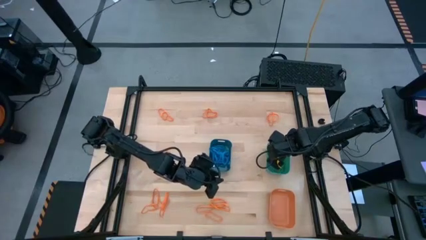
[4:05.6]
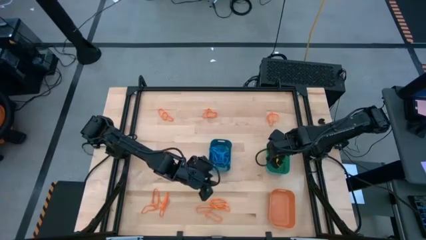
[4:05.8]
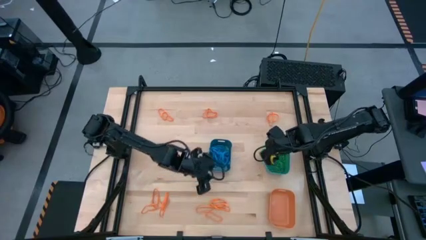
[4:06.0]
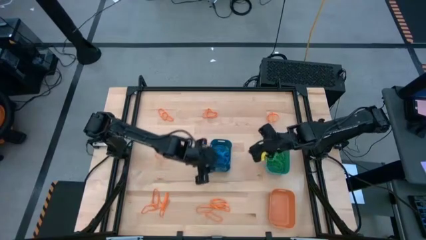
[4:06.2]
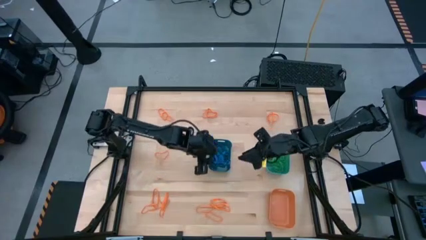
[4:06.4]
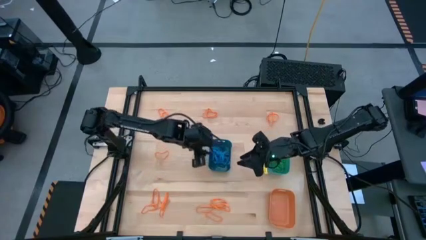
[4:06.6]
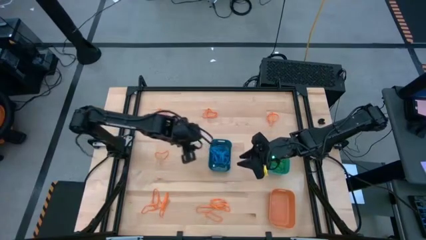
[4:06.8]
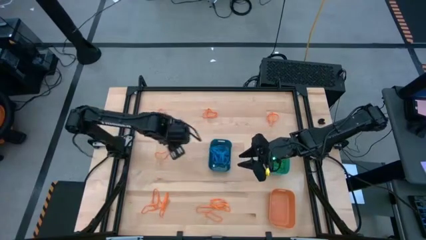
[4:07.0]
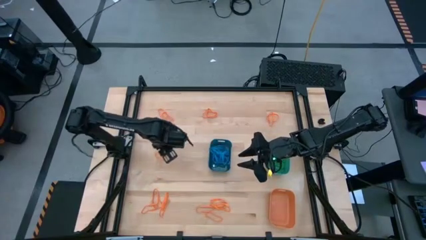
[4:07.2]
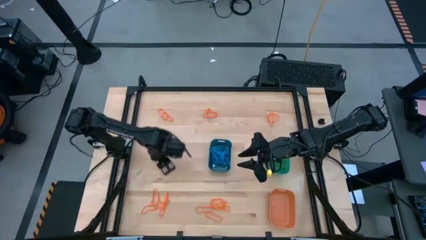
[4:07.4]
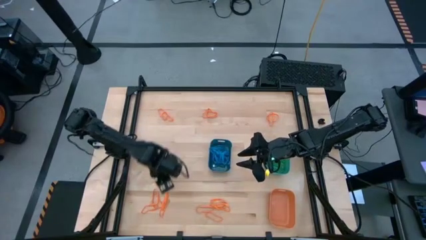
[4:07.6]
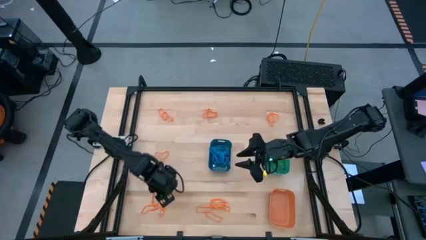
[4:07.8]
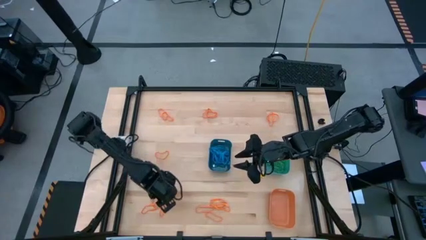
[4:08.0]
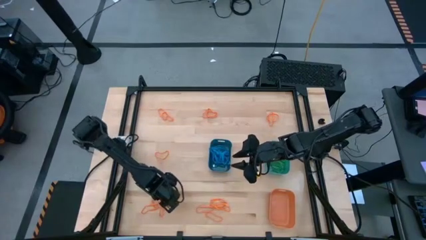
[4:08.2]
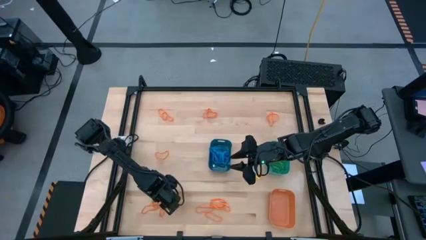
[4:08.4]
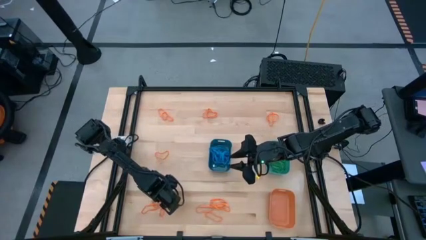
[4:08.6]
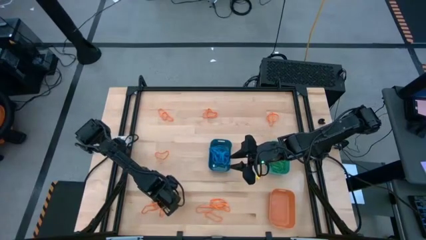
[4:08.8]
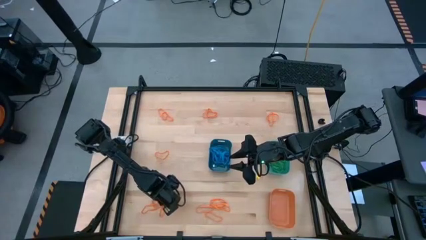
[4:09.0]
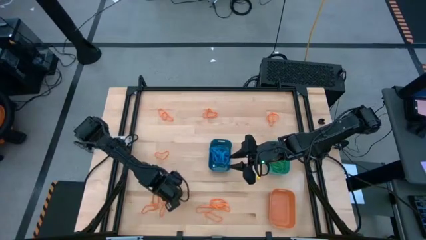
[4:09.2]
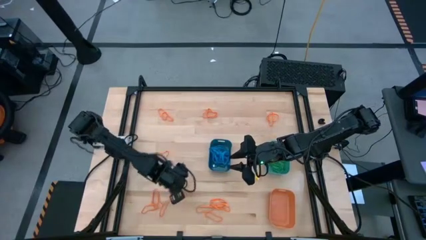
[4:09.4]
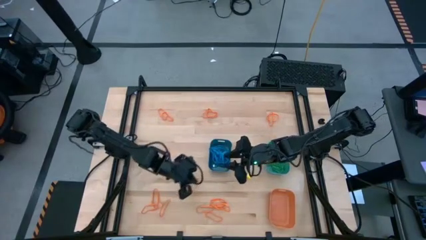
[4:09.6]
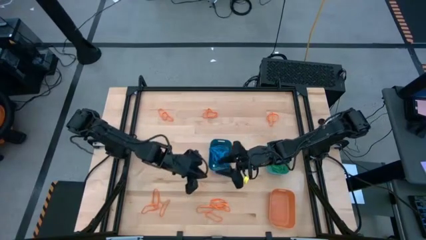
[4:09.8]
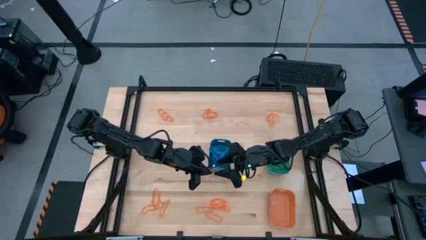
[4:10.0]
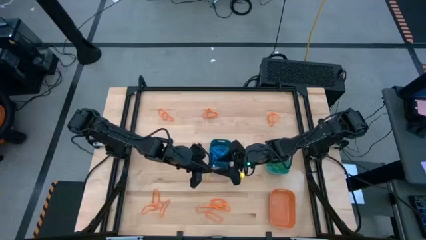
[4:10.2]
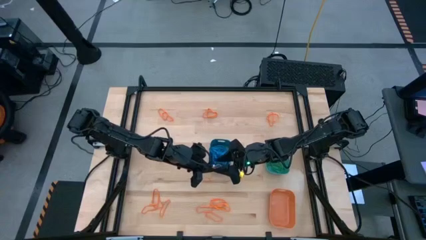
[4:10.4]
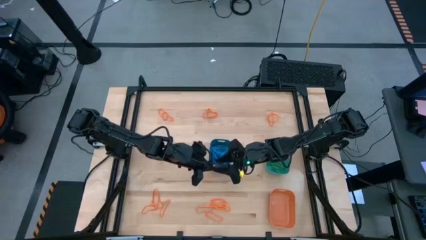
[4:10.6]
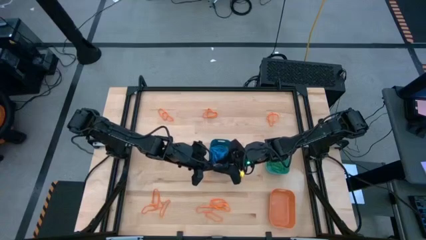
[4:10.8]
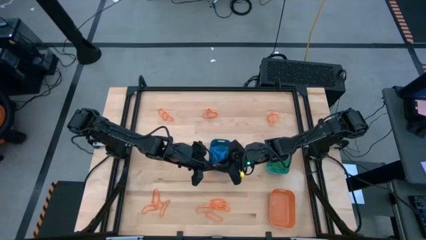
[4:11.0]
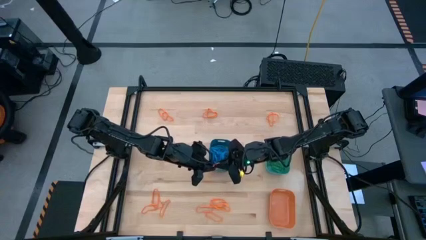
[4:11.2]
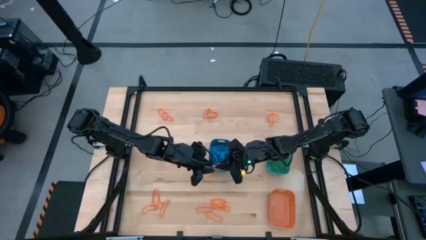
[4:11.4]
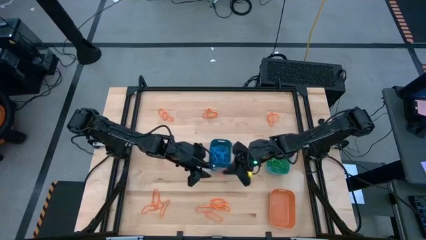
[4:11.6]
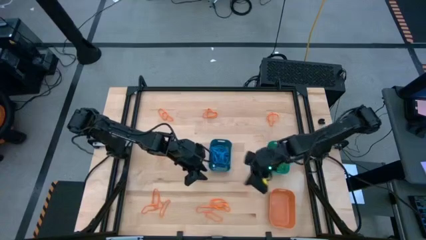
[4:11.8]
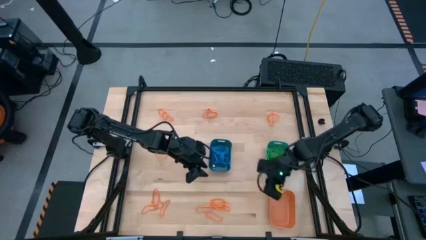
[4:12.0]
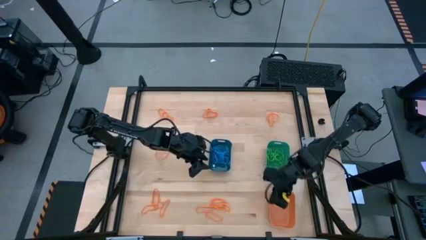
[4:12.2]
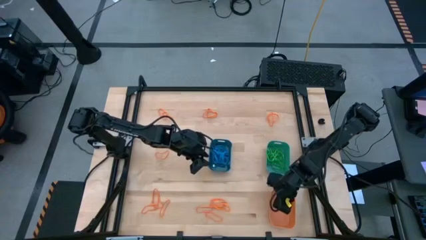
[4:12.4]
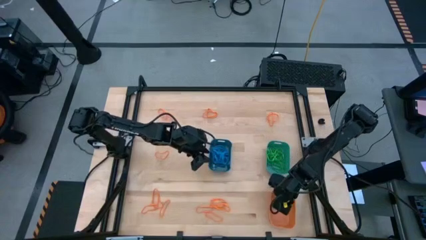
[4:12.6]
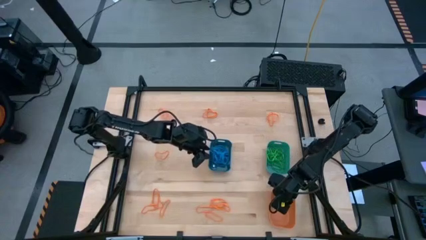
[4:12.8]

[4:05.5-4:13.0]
Task: Sort rubber bands into baskets
Put the orange rubberband into the orange bin

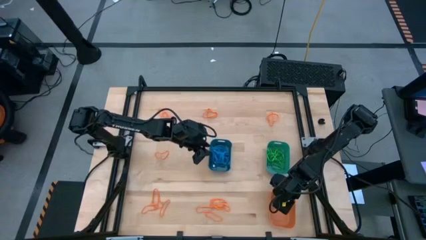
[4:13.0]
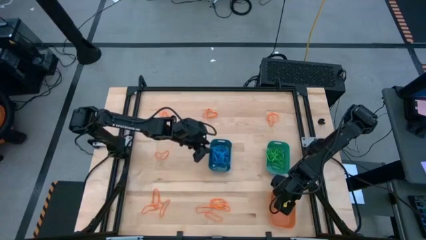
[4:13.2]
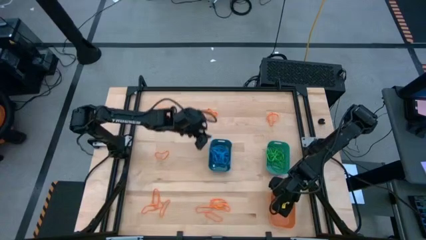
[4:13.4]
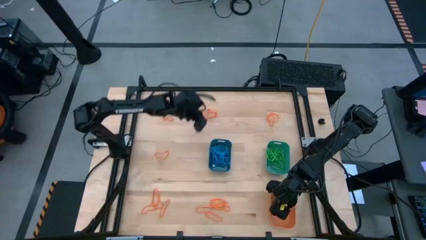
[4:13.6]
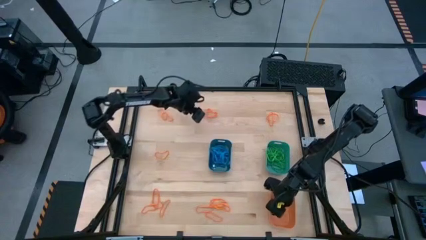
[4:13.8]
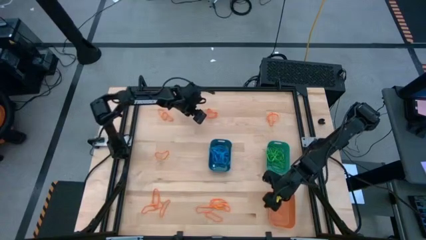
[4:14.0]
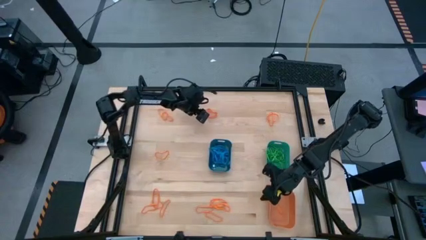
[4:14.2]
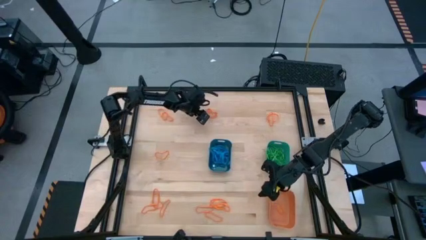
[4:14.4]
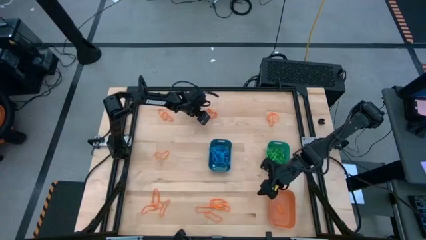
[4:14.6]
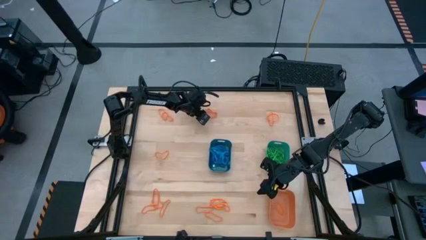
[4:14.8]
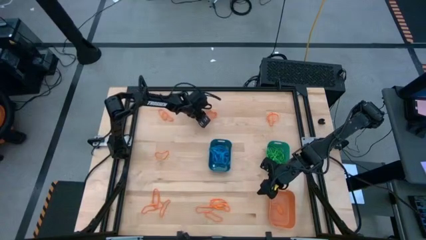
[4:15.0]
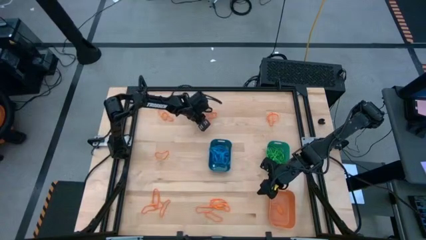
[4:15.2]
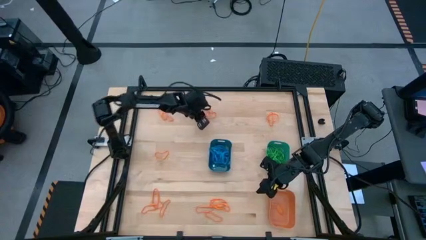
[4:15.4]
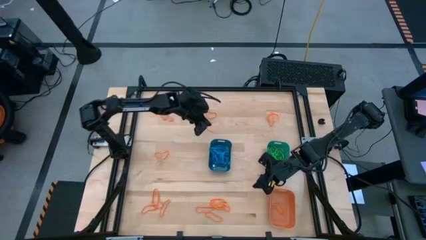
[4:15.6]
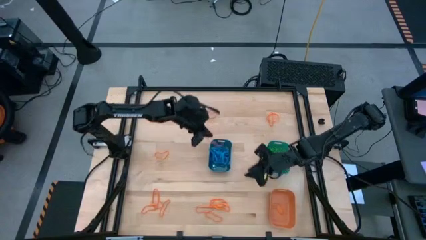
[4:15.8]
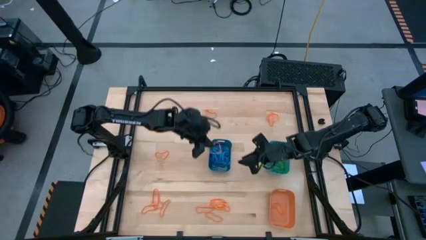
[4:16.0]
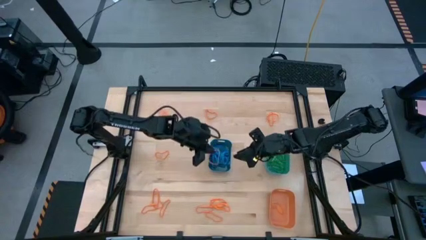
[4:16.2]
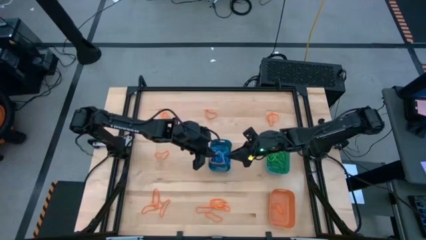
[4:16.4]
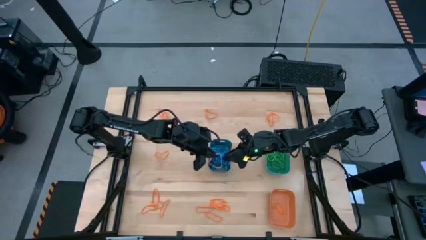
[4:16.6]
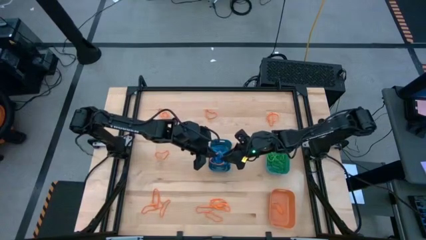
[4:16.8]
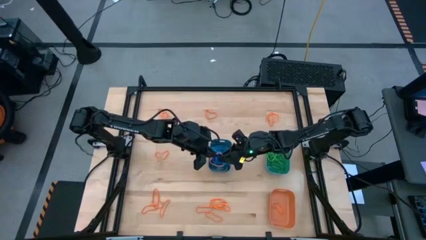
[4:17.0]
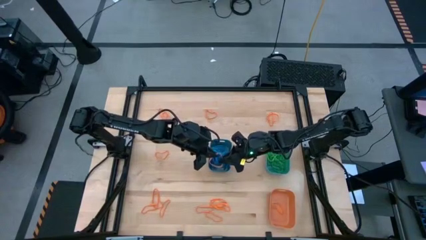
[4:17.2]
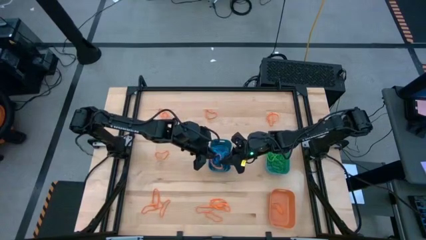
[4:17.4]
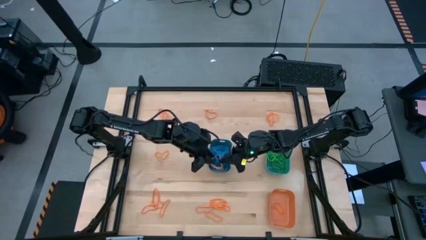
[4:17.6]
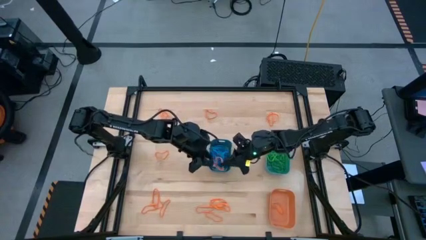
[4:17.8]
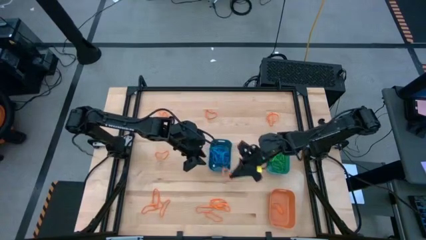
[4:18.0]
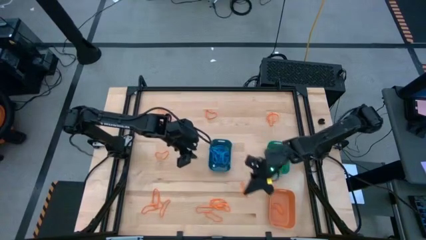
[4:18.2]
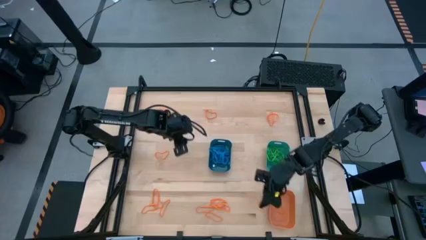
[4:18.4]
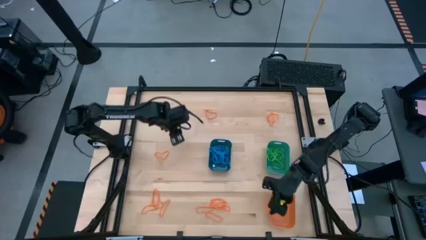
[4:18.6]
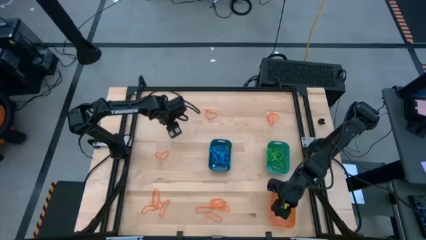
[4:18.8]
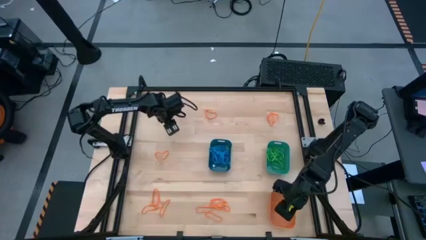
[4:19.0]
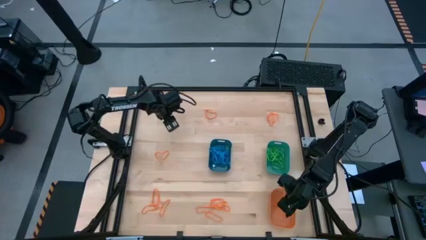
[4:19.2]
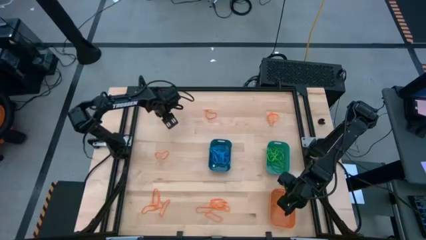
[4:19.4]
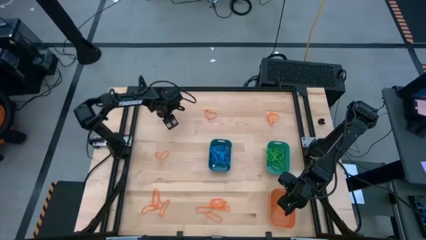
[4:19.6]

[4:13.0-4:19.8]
Put the orange rubberband into the orange bin

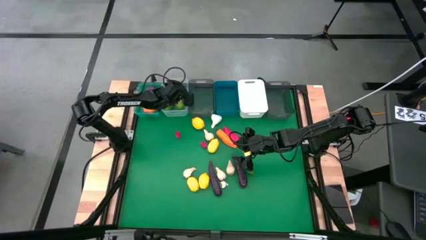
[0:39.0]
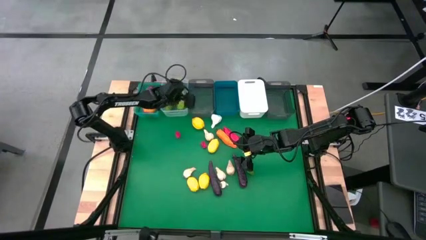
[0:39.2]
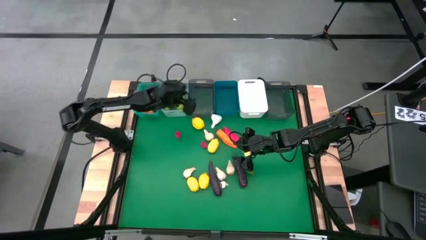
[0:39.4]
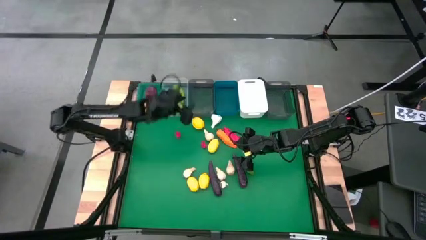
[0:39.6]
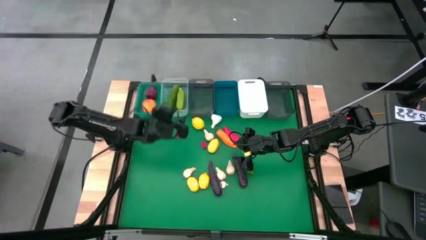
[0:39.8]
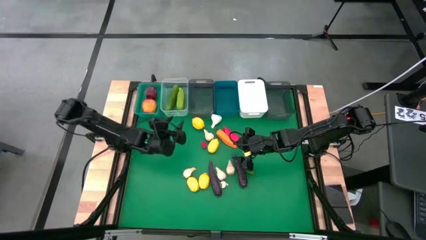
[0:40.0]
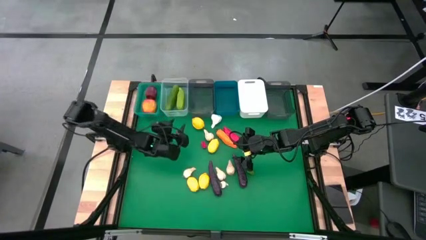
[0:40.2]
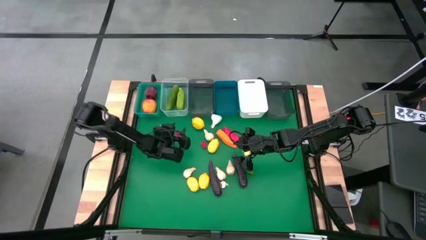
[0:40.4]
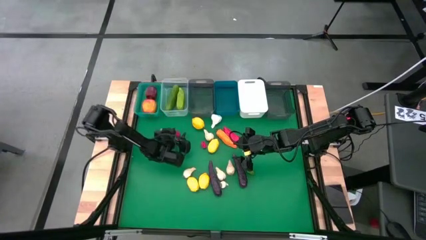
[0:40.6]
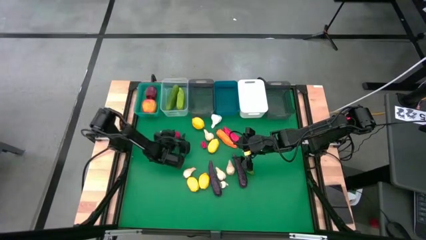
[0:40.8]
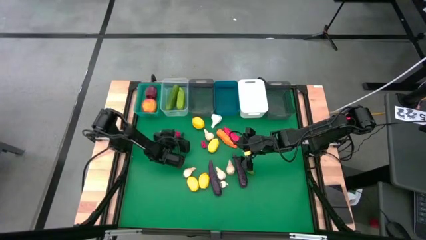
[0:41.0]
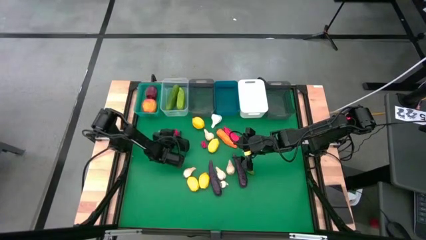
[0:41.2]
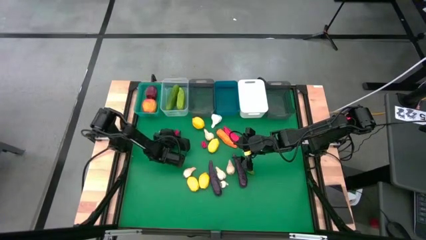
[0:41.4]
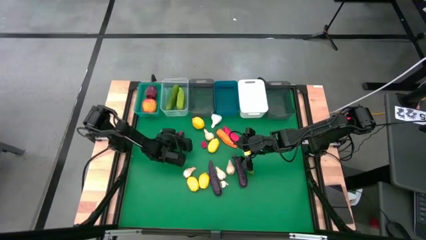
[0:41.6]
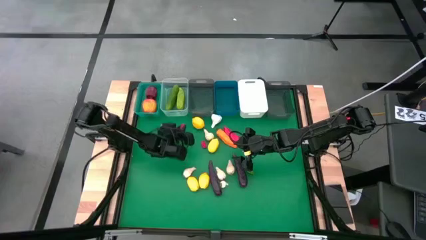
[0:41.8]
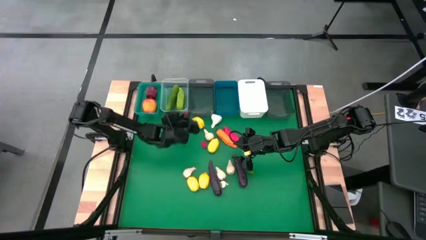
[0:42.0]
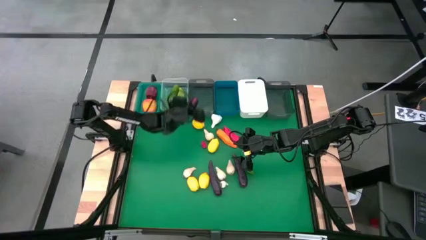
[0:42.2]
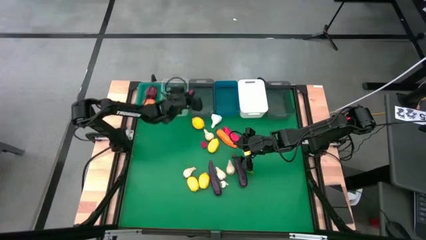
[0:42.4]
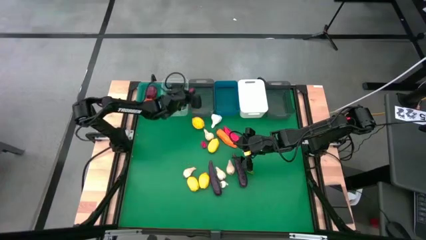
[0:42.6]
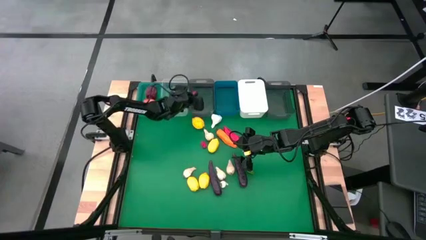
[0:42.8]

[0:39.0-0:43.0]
Task: Sort produce into baskets
Put the red chili pepper into the left black bin
